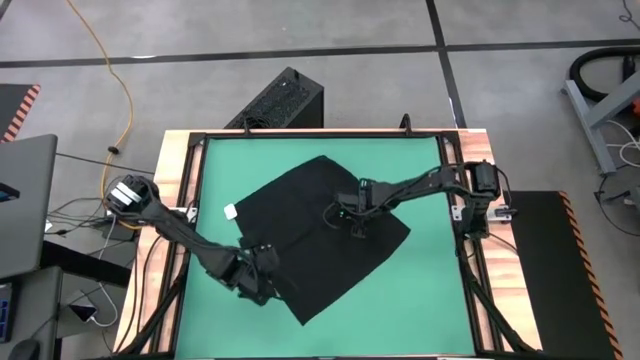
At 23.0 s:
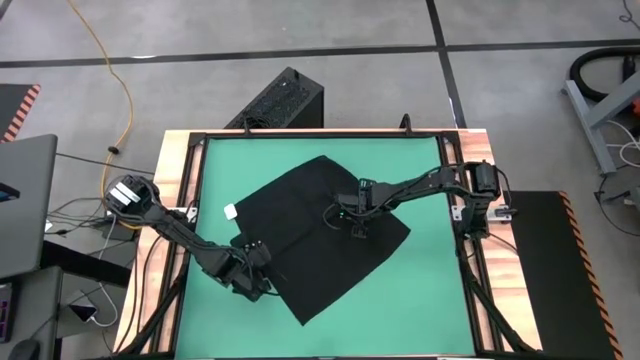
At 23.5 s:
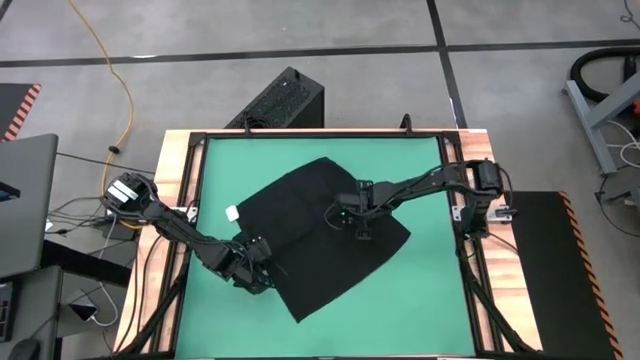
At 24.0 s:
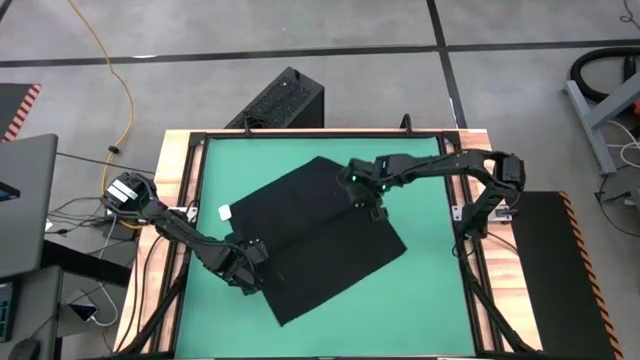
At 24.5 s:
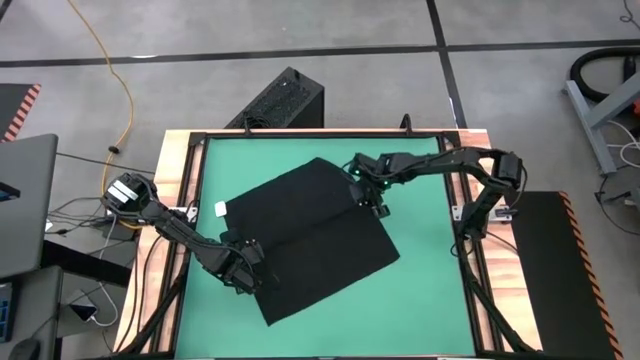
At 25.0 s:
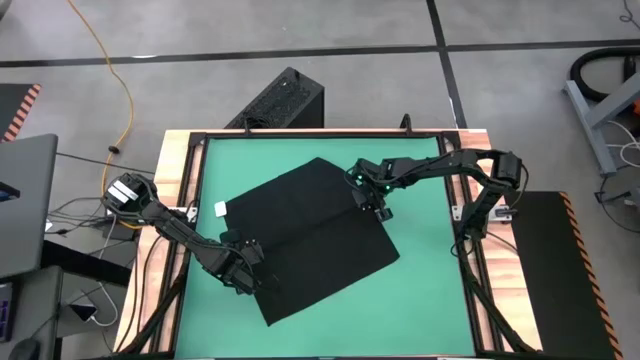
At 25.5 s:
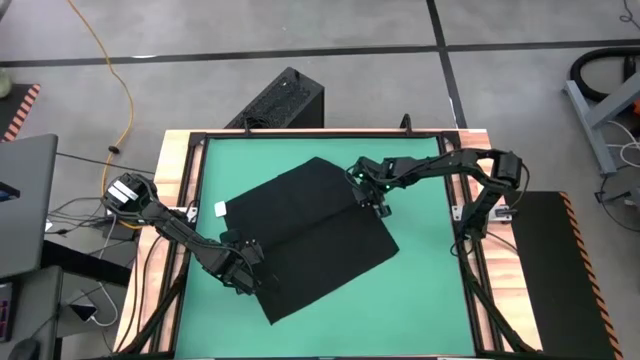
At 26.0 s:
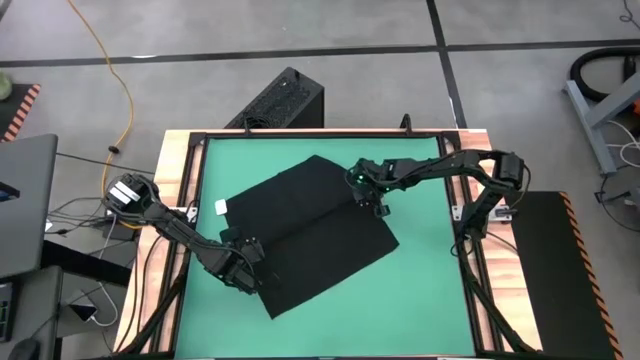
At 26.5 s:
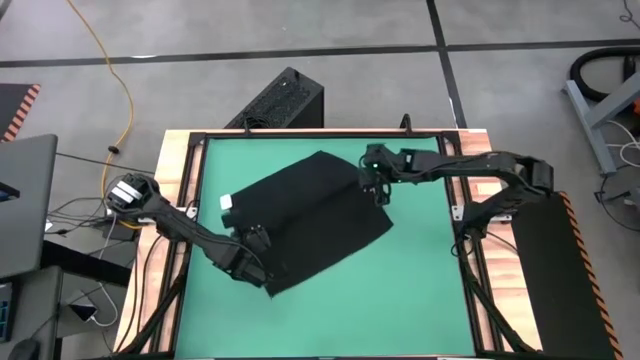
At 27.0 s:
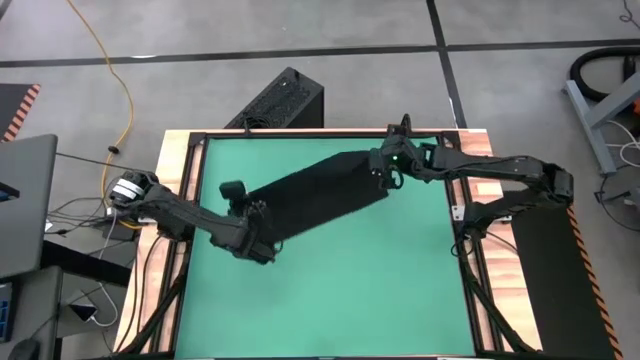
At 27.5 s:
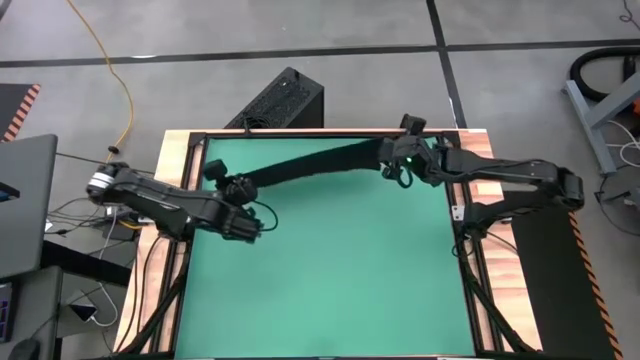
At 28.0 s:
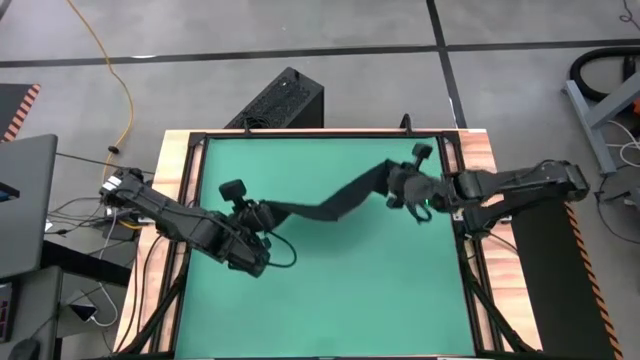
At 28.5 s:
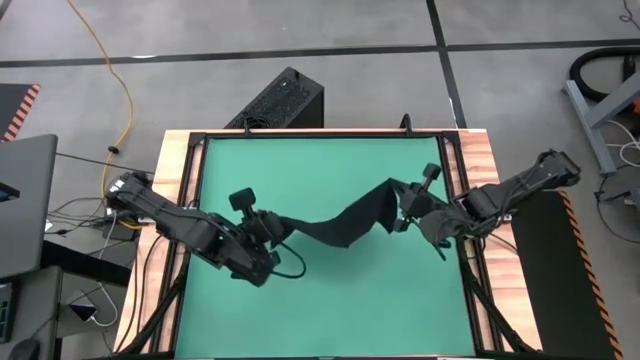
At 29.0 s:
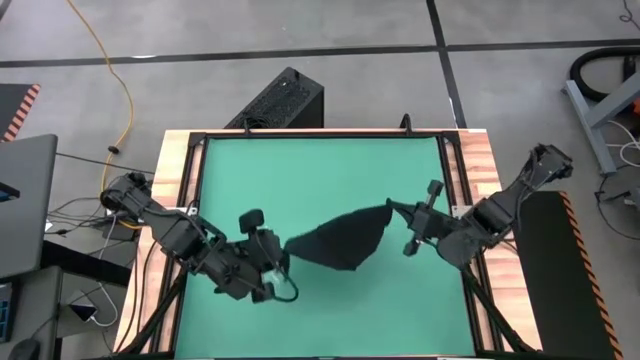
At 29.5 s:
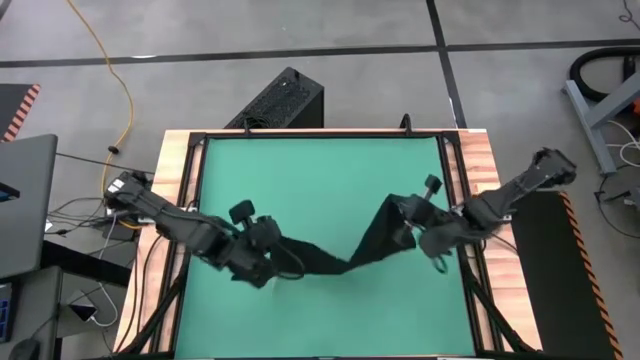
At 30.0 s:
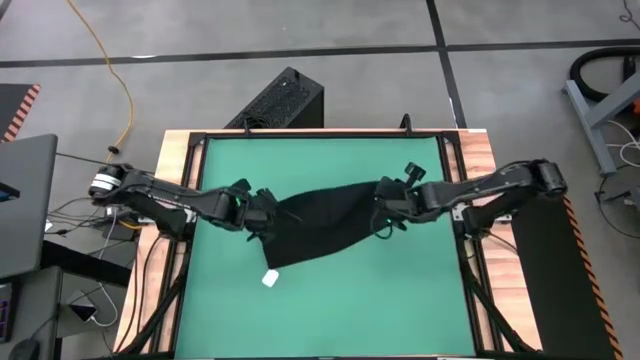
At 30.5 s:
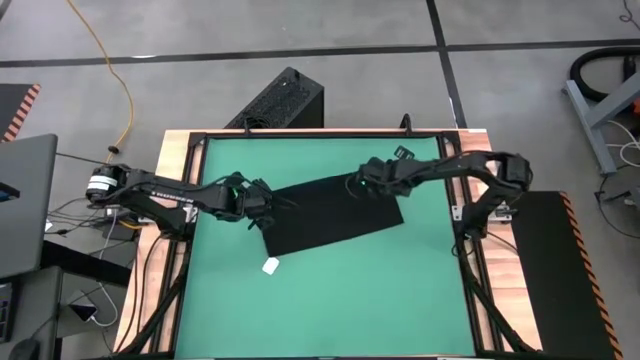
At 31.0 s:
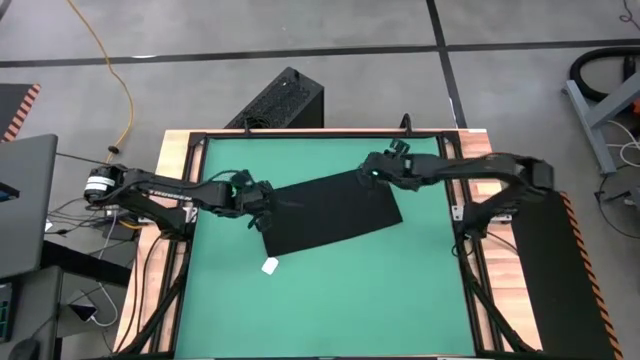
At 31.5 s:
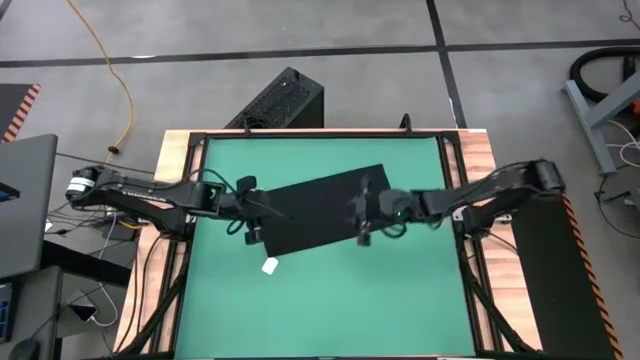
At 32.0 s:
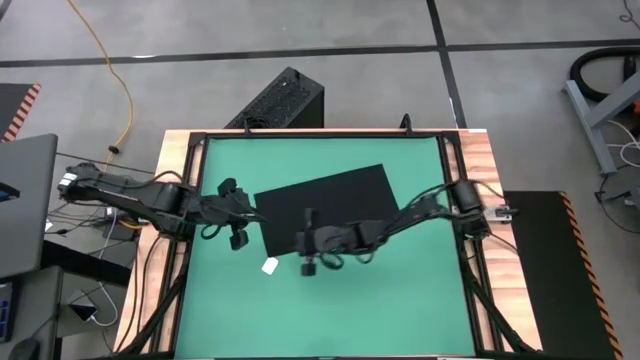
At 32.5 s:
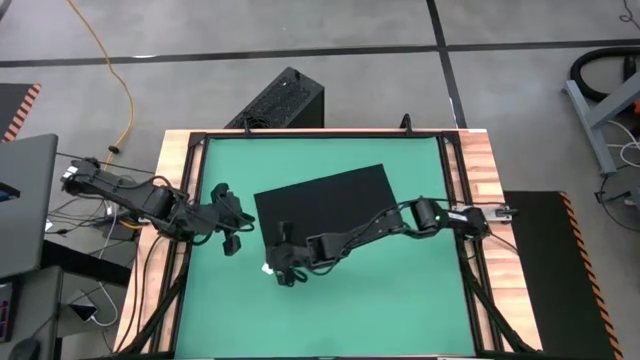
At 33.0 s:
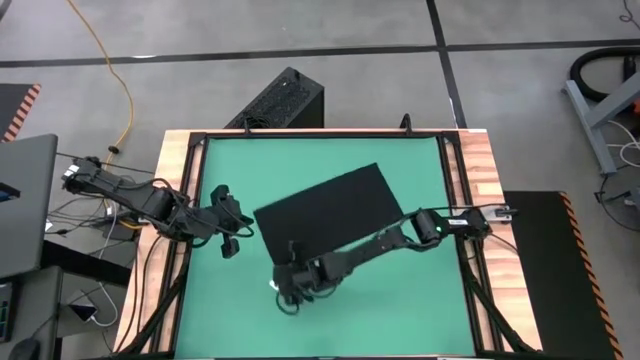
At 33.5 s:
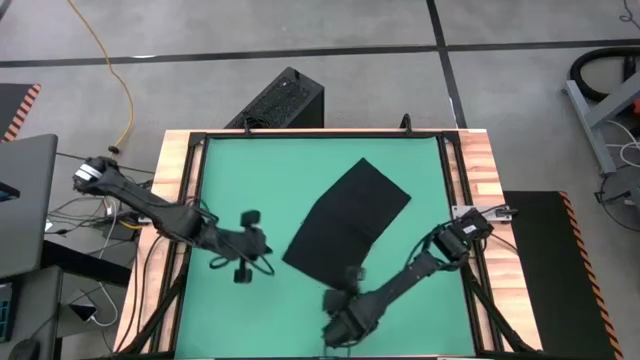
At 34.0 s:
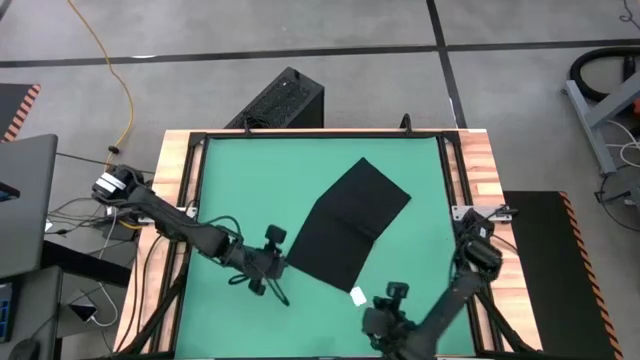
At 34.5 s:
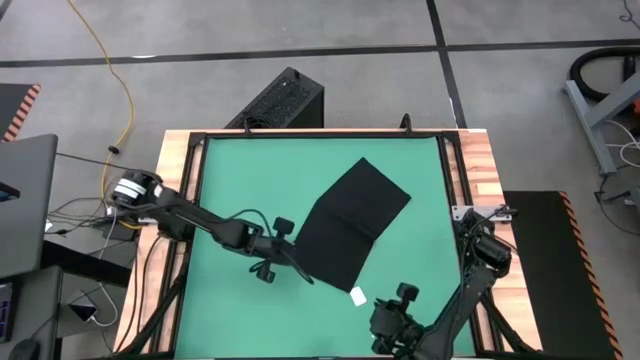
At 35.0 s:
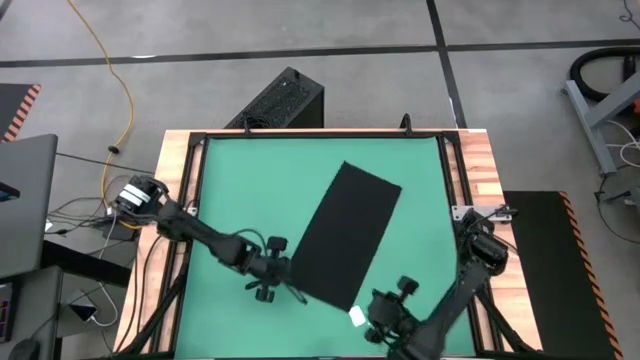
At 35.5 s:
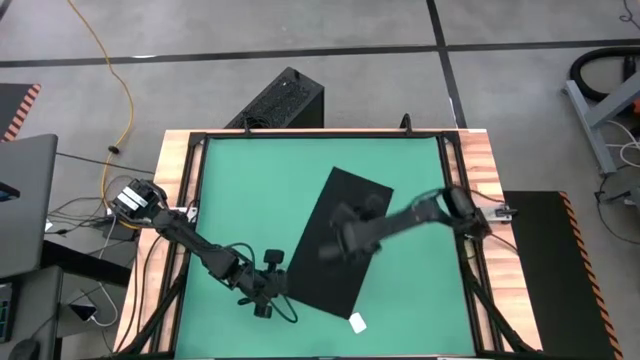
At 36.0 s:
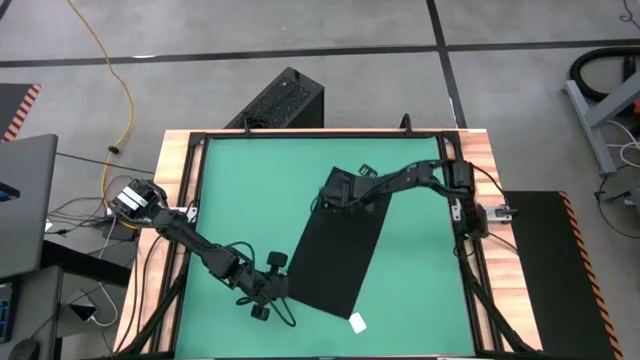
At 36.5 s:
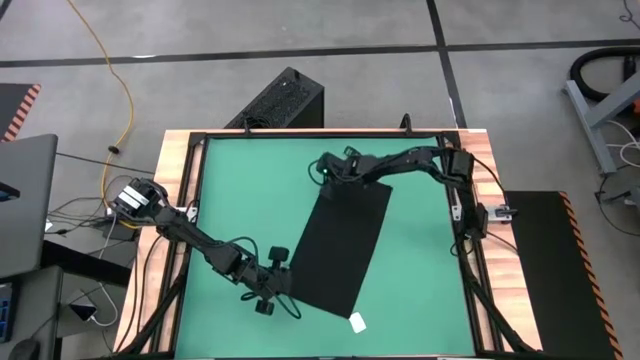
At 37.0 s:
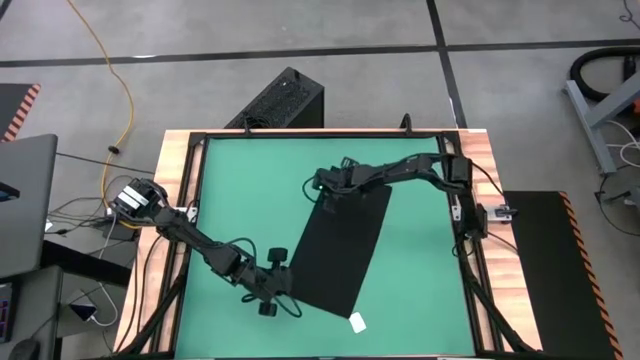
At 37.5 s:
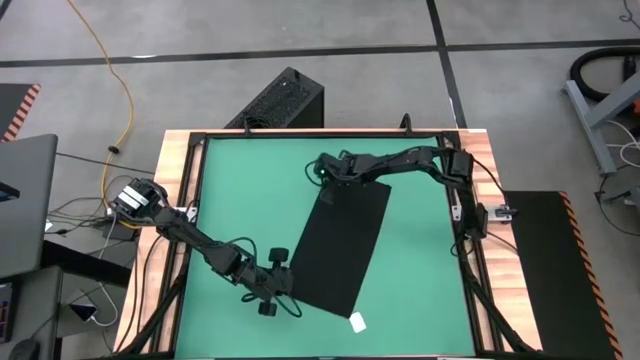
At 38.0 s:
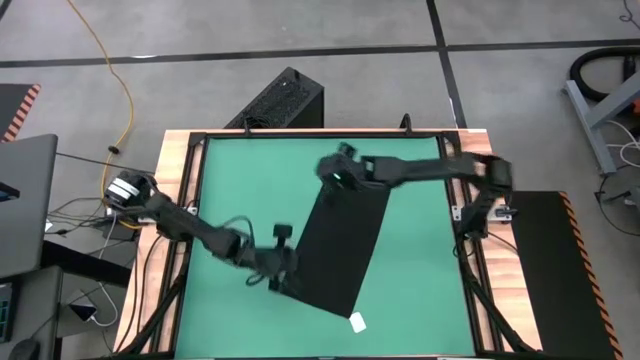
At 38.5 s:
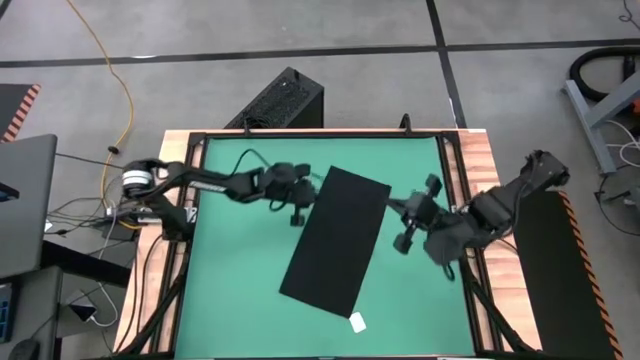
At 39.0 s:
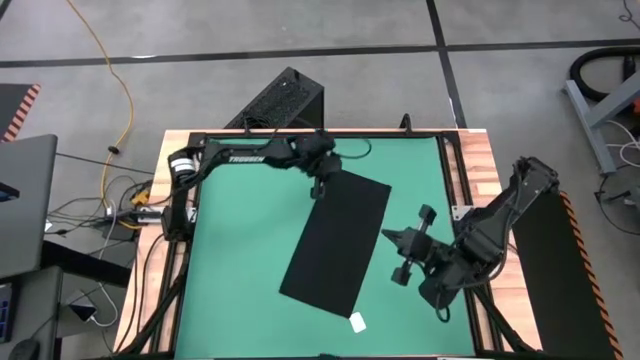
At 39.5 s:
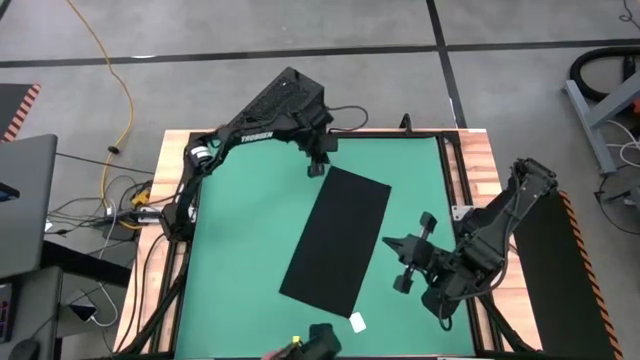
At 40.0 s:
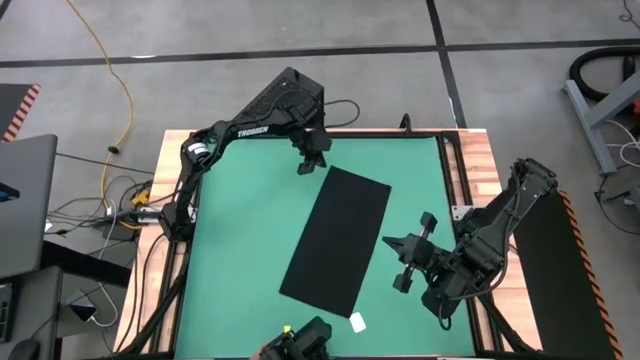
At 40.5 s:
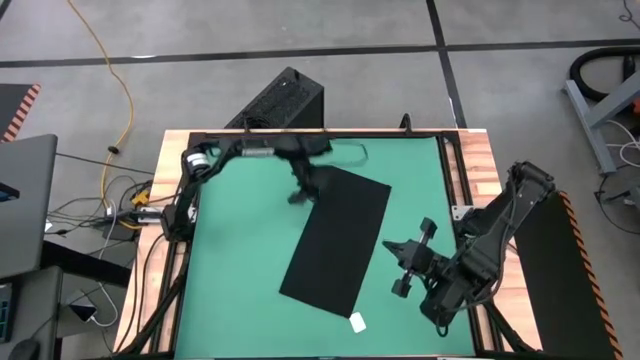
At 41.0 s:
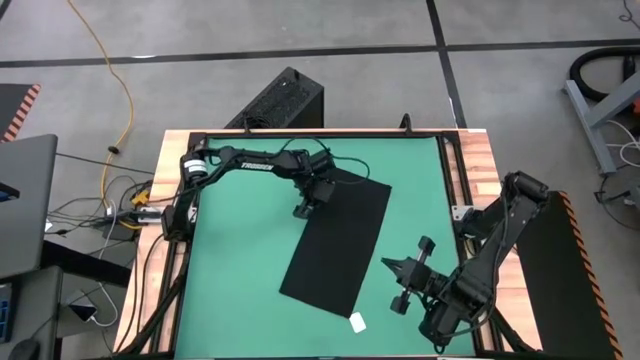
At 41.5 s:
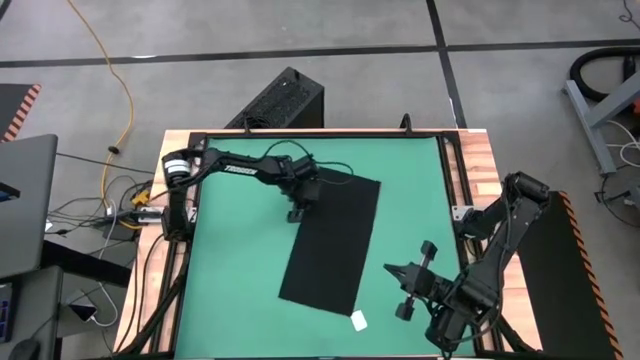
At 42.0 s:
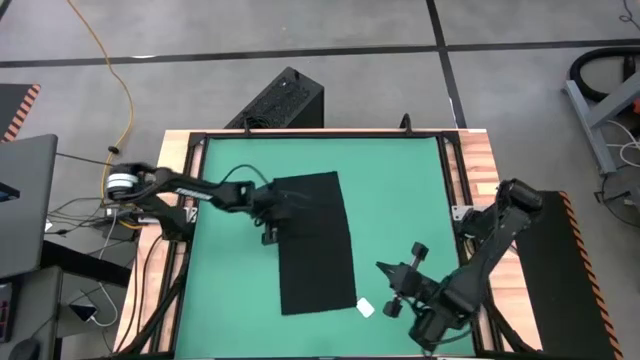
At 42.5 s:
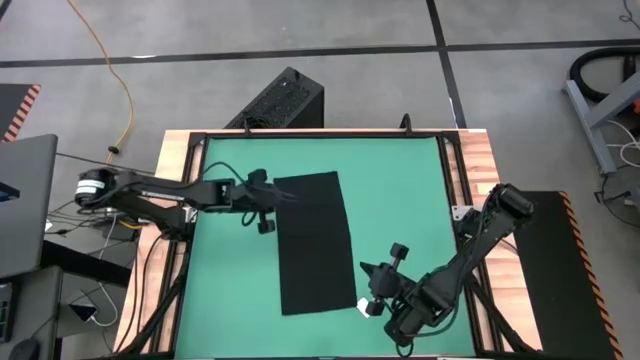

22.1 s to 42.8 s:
Task: Roll towel
Fold the black towel

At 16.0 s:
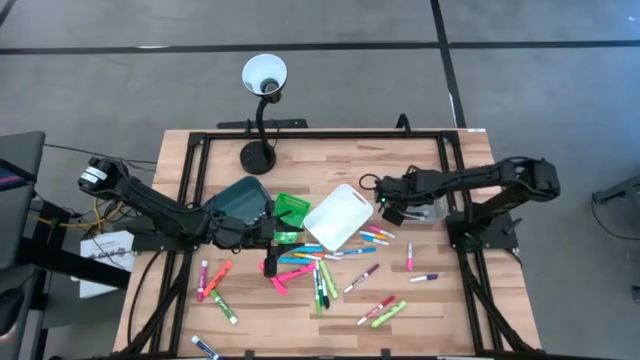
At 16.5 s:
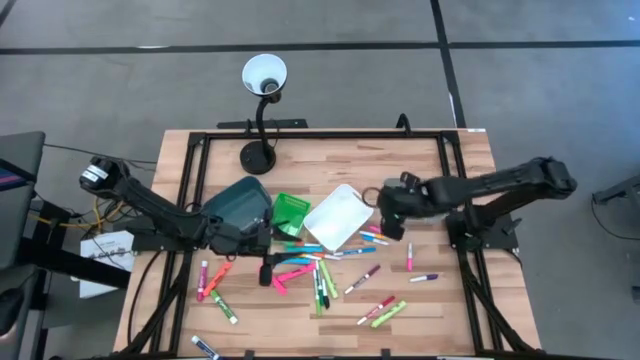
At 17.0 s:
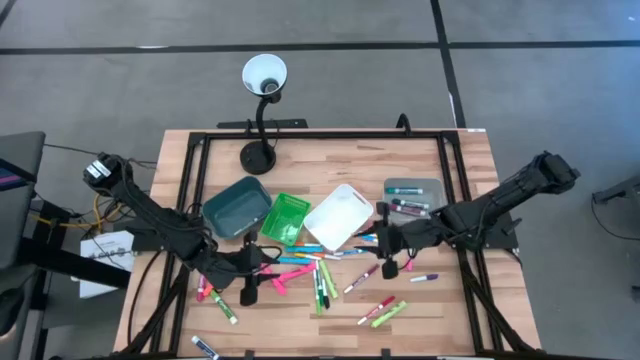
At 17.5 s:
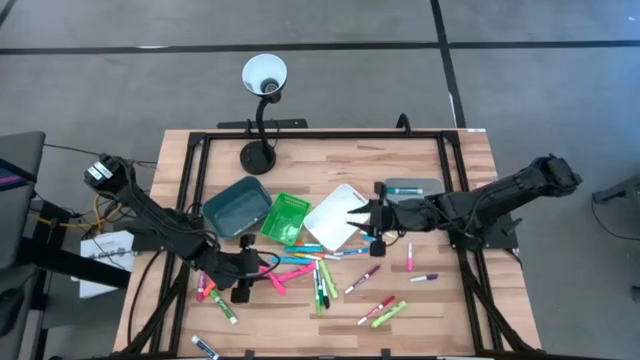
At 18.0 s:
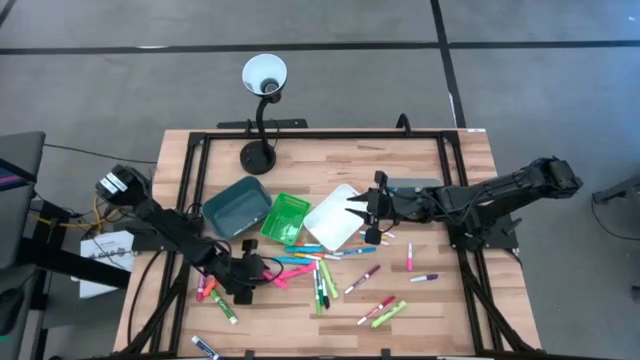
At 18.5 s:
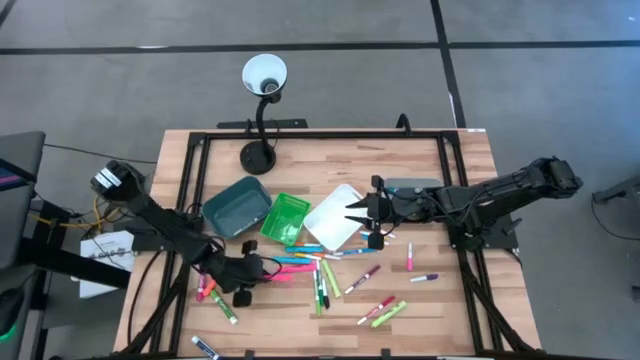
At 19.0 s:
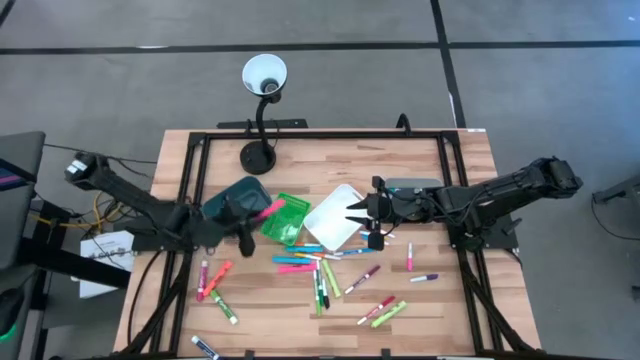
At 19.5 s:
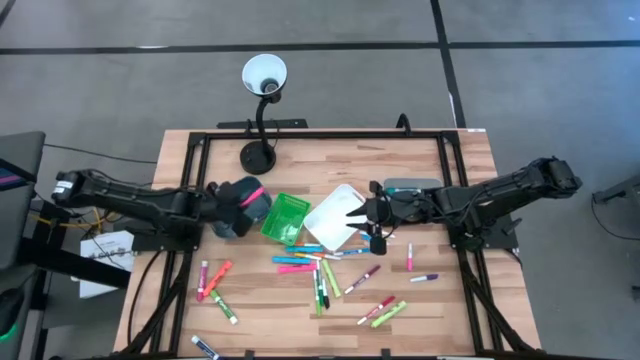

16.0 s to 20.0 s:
Task: Pick & Place Markers
Put the pink highlighter pen into the blue bin
